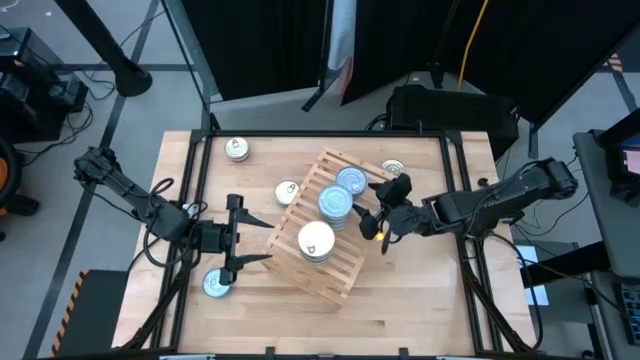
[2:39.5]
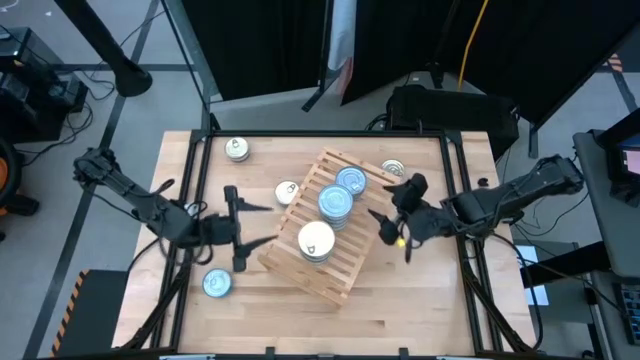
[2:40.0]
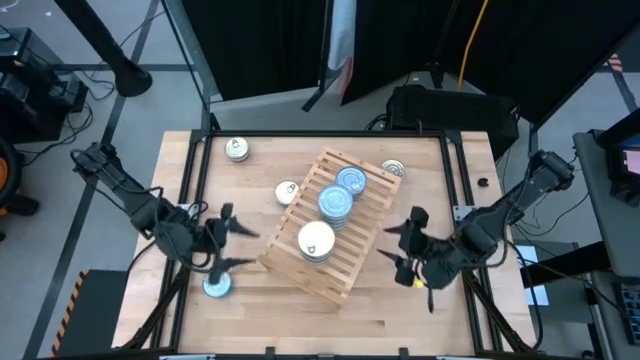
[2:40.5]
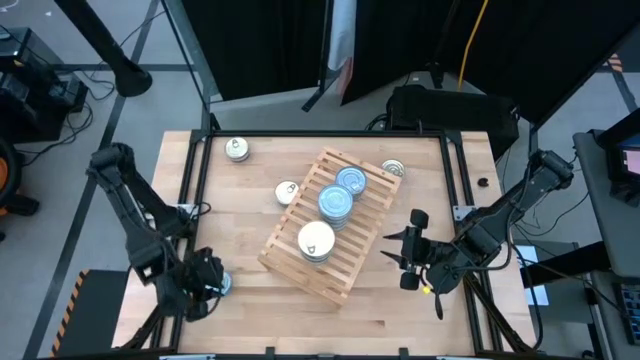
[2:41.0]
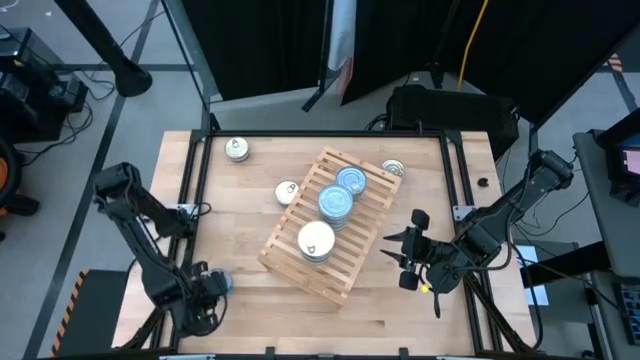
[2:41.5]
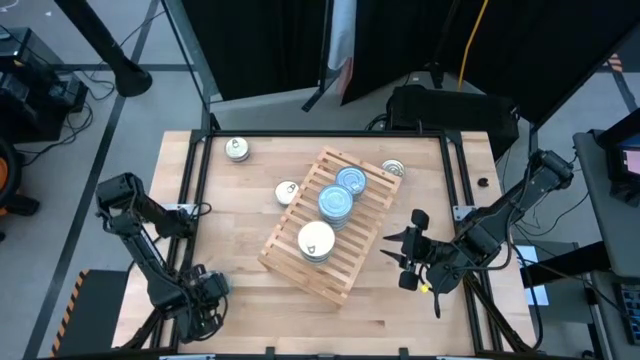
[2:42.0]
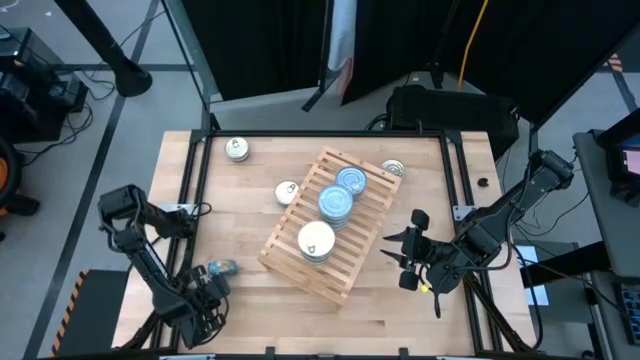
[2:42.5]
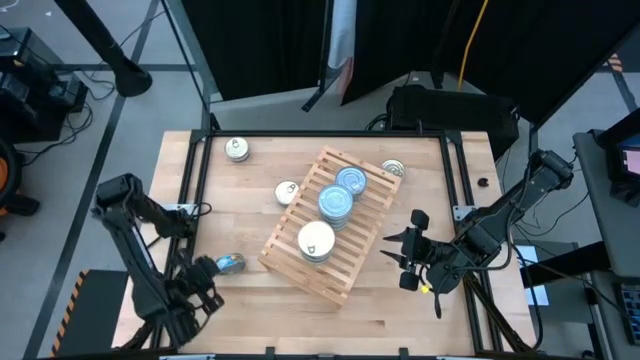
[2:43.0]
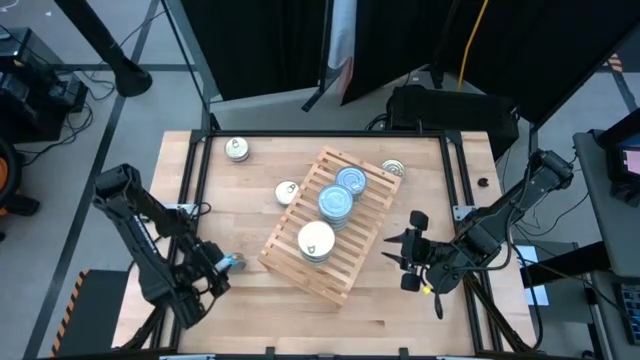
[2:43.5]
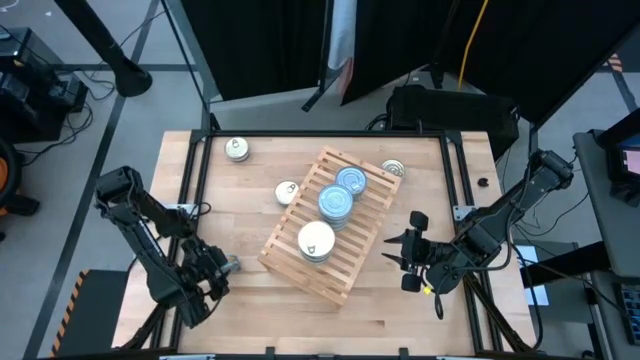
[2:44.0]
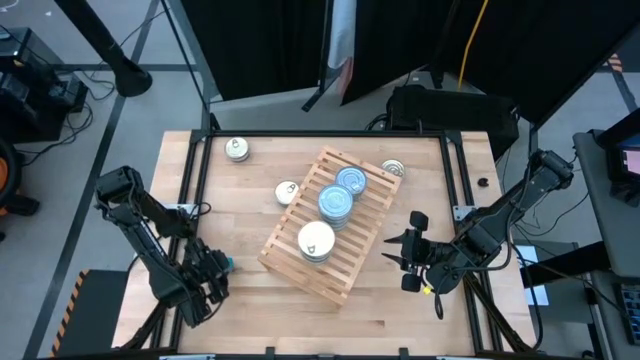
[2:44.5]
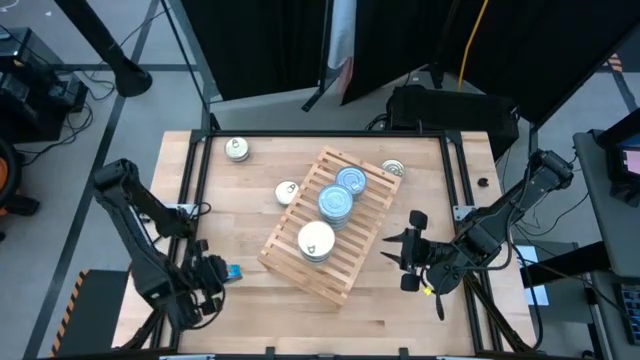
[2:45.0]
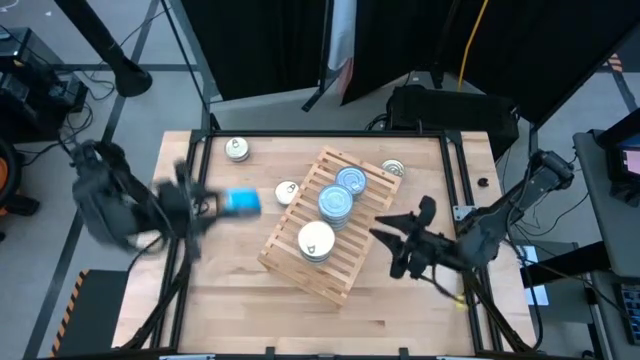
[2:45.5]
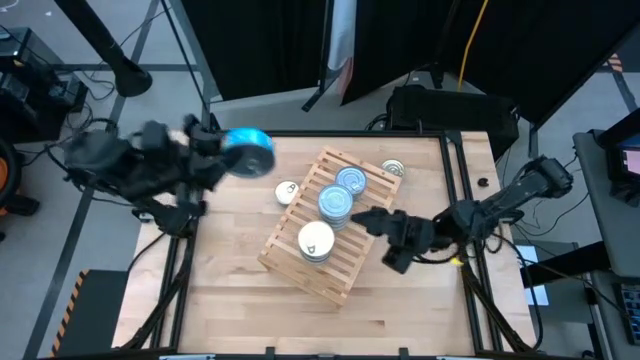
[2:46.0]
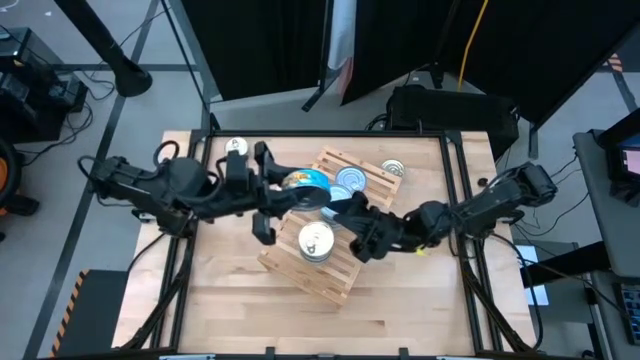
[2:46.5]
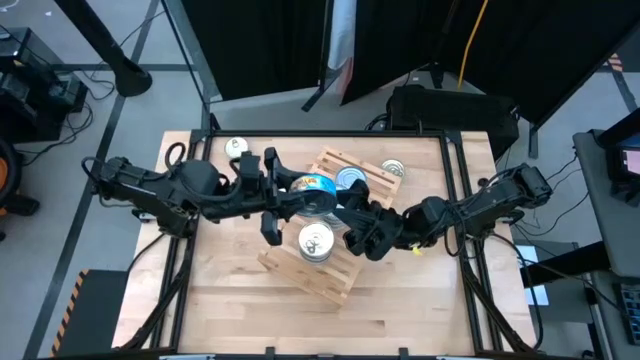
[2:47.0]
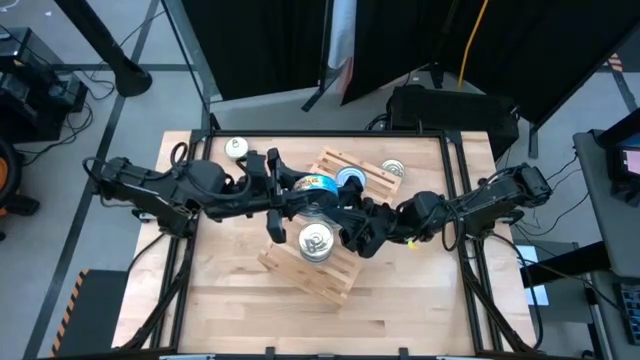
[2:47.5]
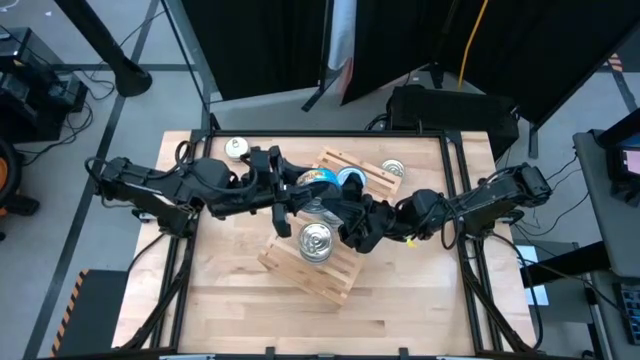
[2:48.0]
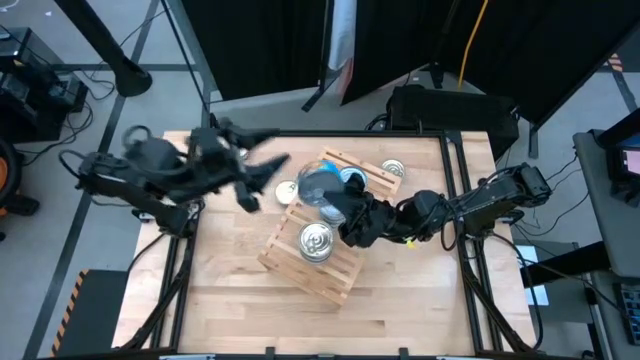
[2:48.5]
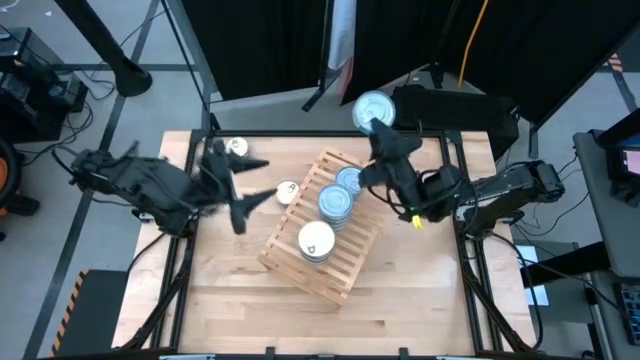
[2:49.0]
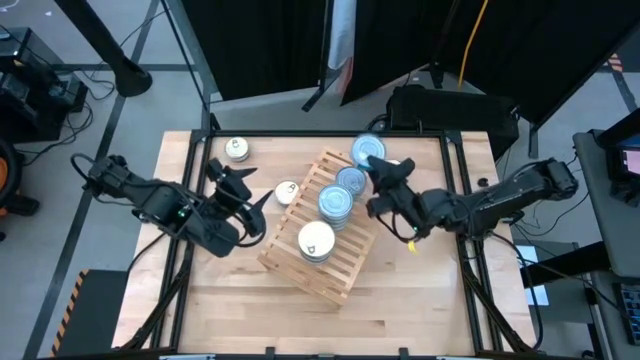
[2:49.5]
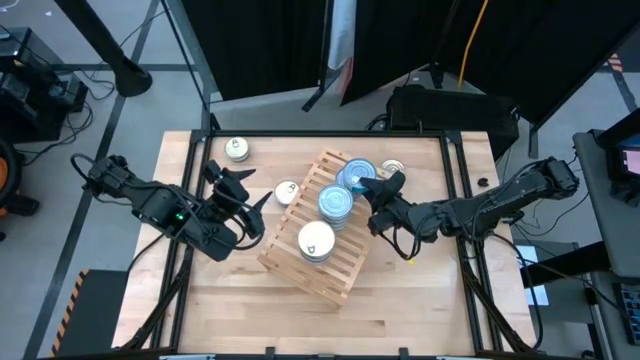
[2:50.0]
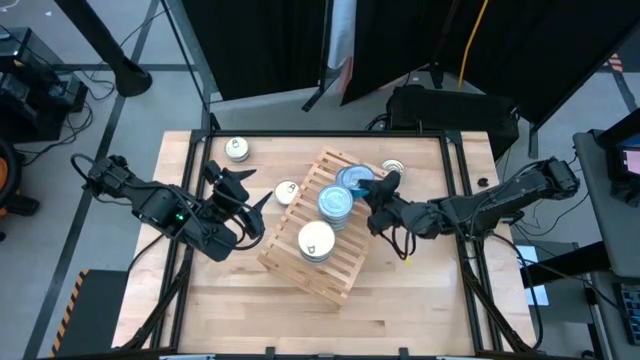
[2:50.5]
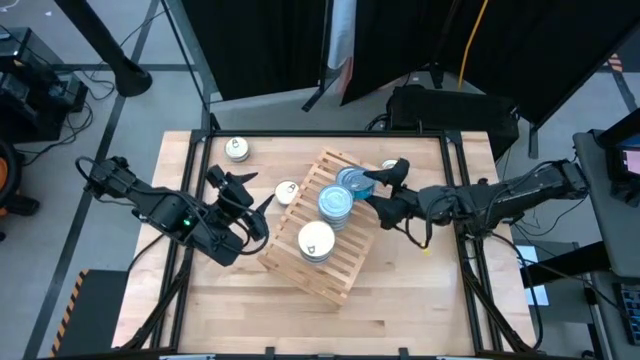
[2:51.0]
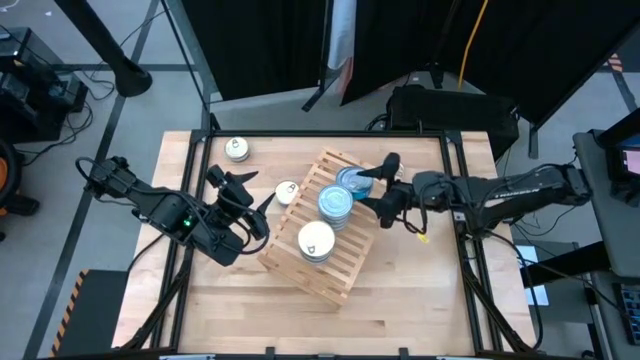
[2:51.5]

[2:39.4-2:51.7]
Task: Stack canned seafood by type on shelf
Stack the yellow-blue tuna can on top of the other yellow-blue tuna can on the shelf

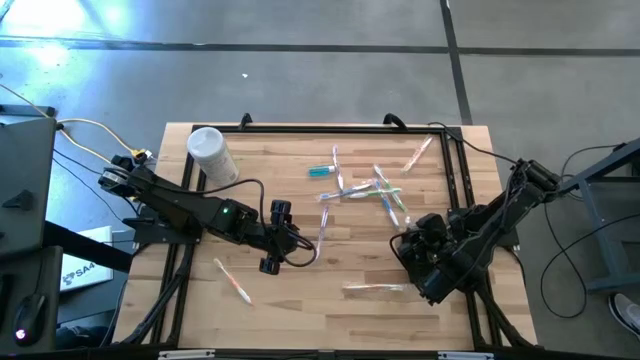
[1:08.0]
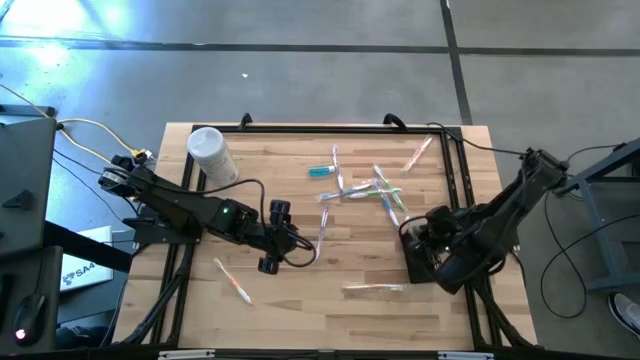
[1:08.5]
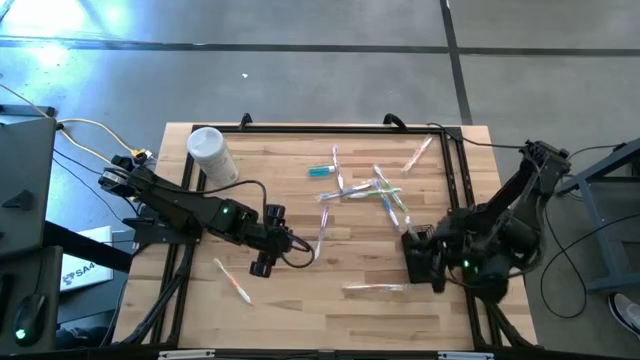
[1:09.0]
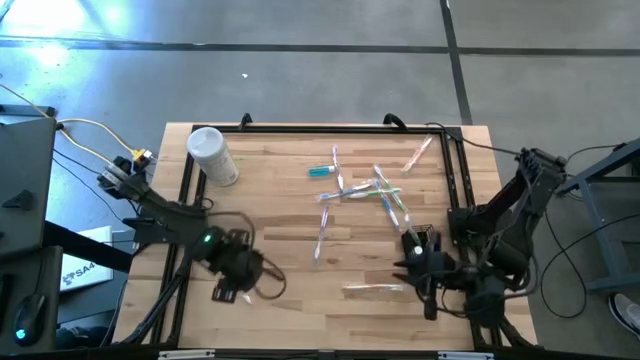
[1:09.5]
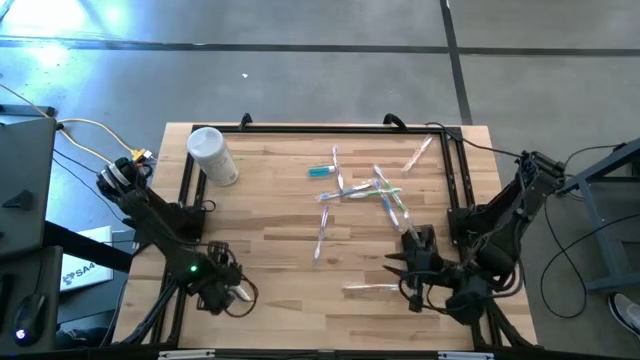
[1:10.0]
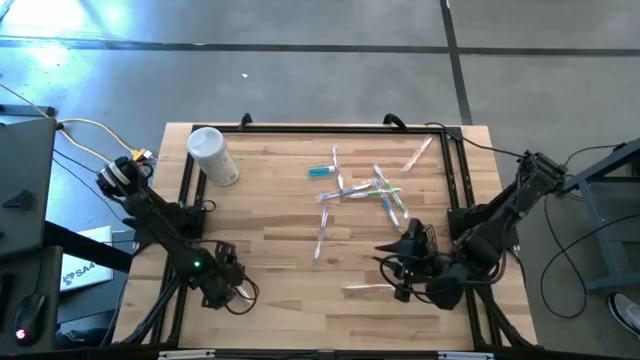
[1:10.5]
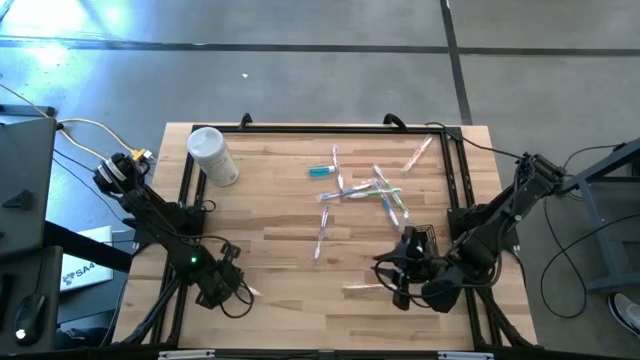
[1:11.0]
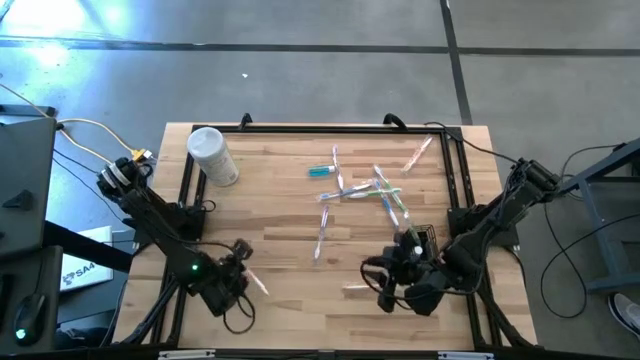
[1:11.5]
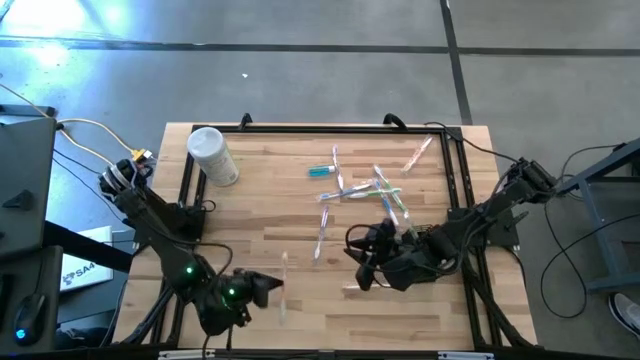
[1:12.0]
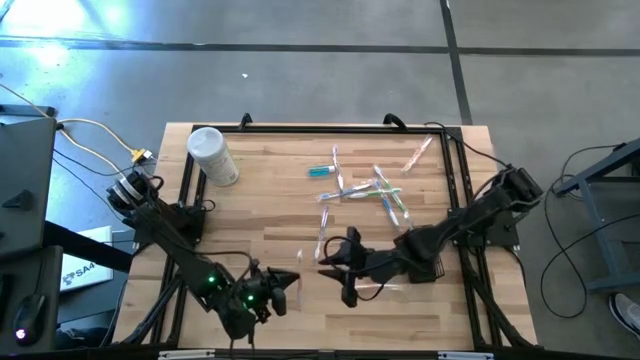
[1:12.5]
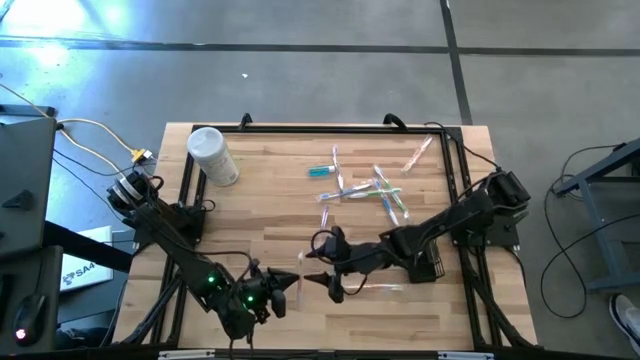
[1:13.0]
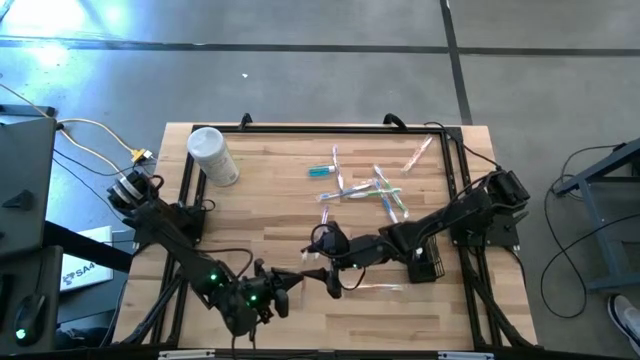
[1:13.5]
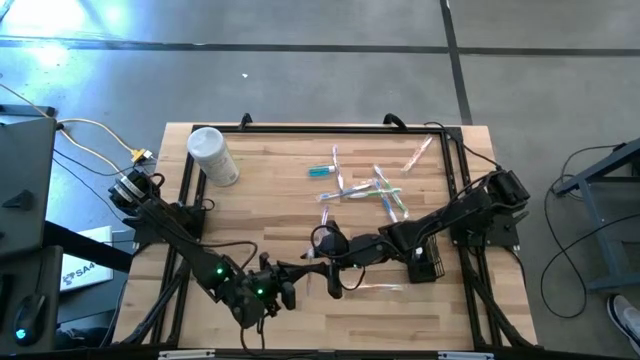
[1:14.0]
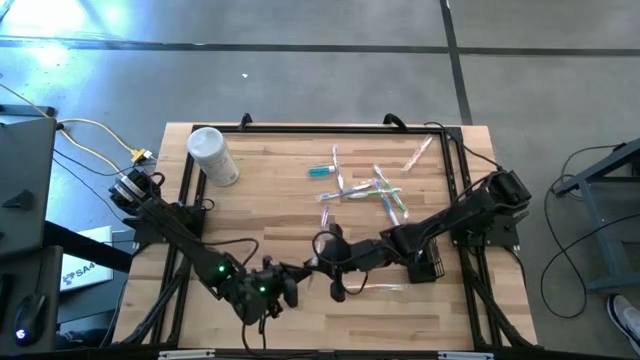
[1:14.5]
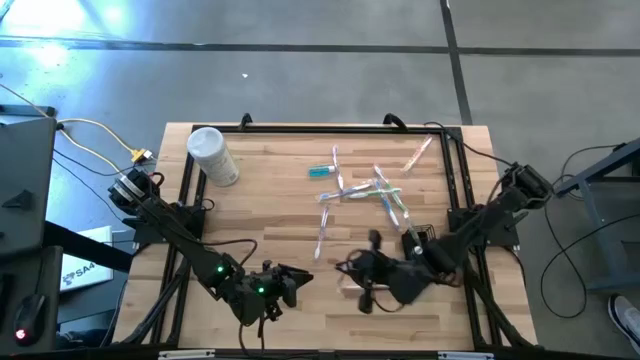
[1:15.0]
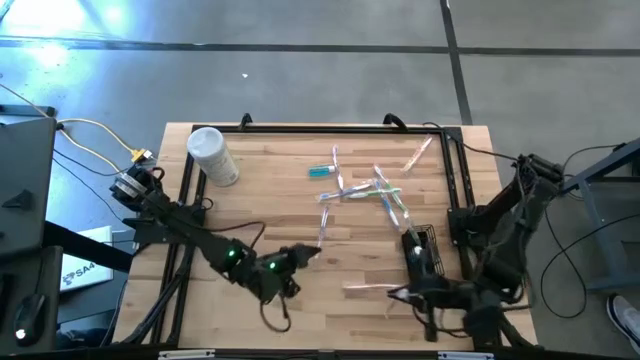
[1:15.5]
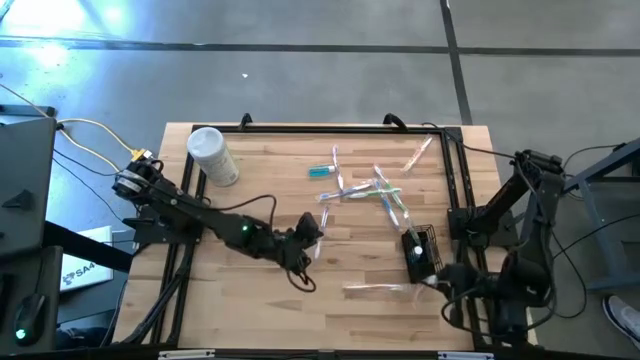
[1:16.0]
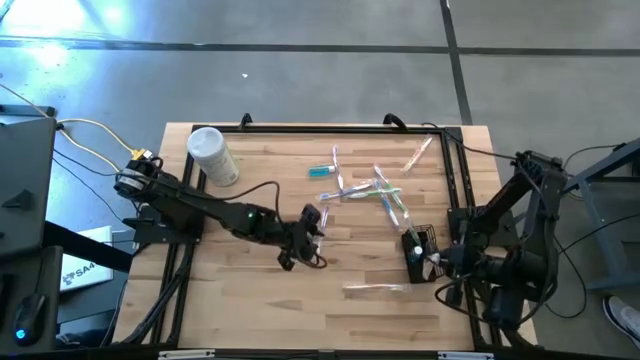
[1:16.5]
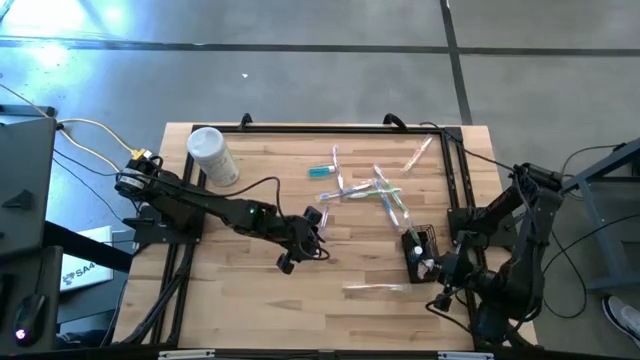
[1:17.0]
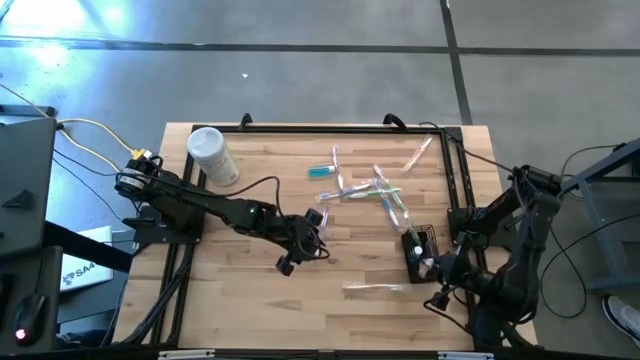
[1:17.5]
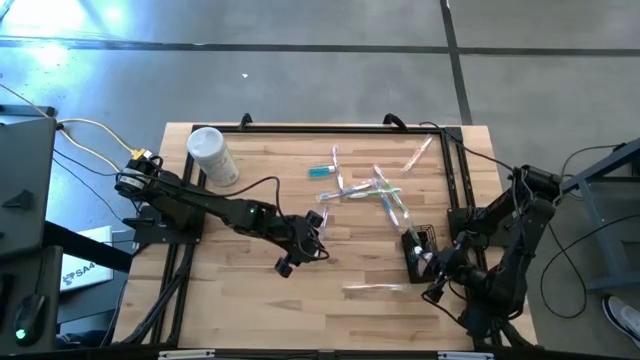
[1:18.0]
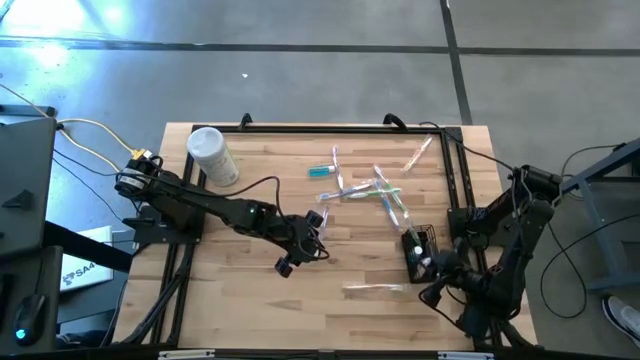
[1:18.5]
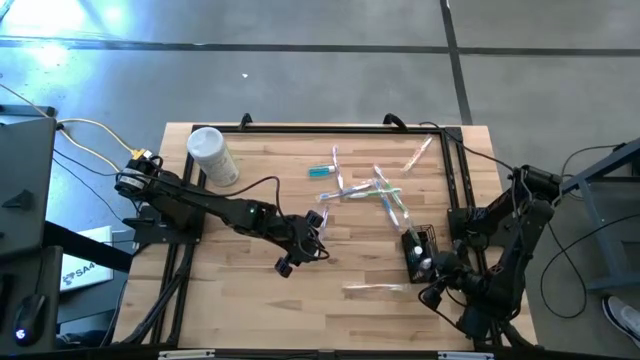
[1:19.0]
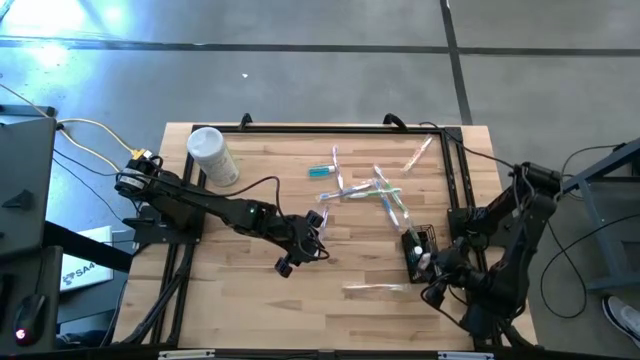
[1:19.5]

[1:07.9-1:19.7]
Task: Pick & Place toothbrushing station
Put the bottom left orange toothbrush into the black mesh organizer
